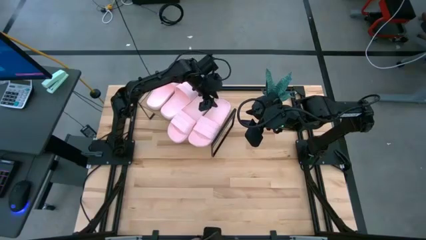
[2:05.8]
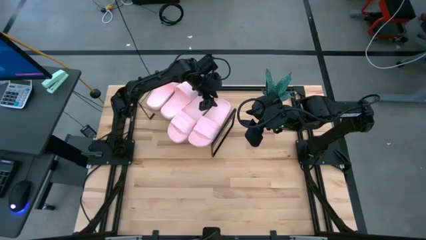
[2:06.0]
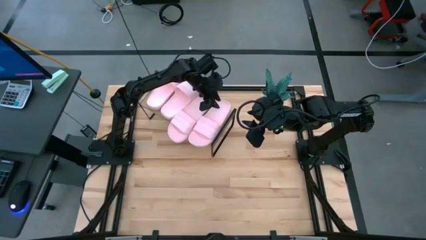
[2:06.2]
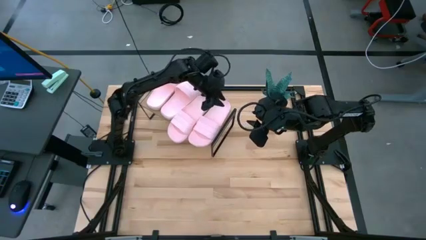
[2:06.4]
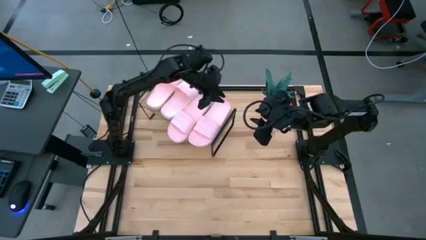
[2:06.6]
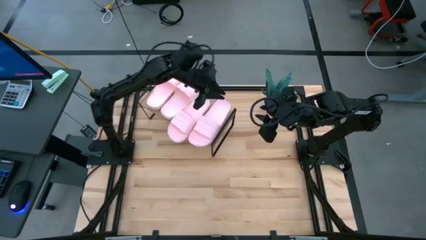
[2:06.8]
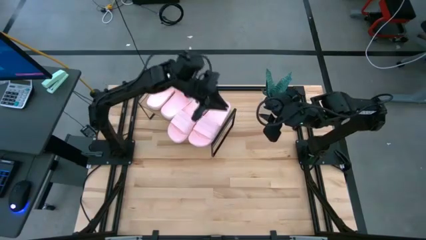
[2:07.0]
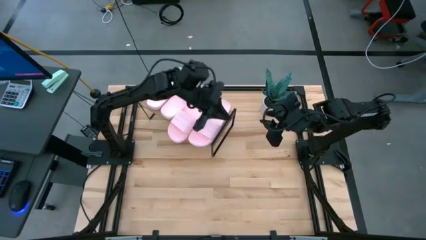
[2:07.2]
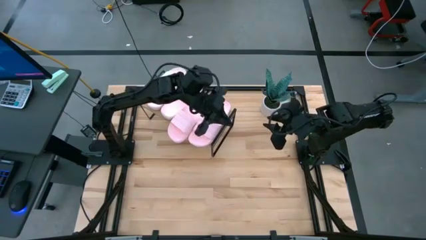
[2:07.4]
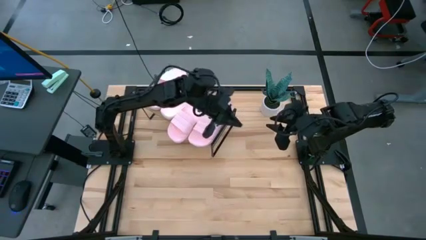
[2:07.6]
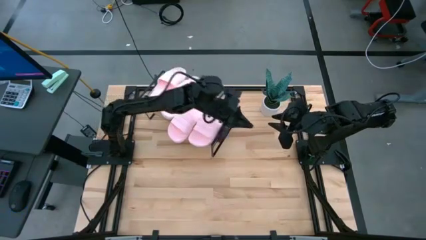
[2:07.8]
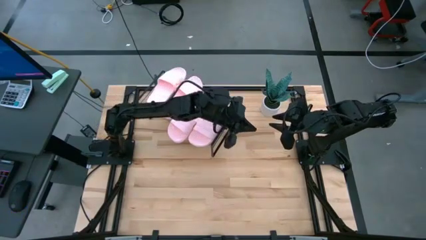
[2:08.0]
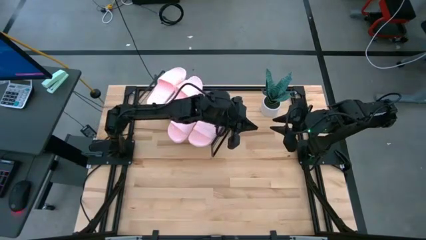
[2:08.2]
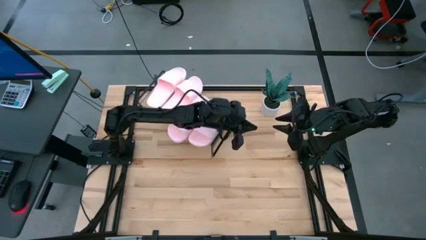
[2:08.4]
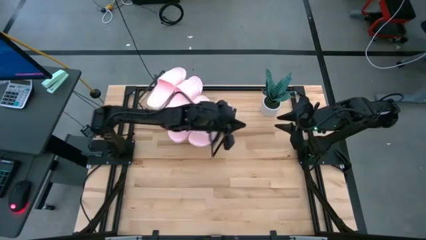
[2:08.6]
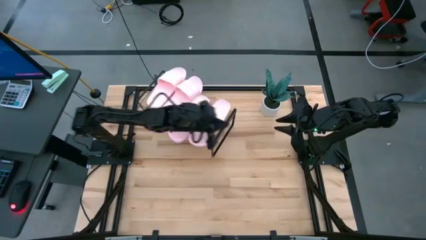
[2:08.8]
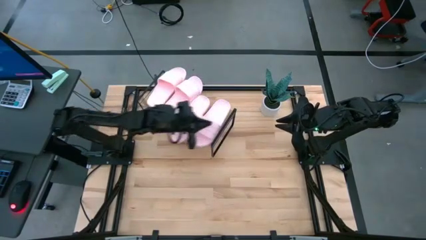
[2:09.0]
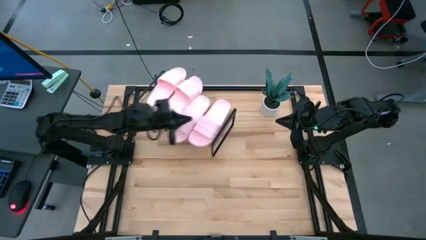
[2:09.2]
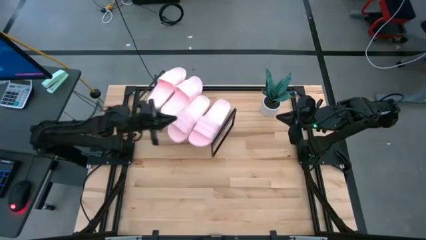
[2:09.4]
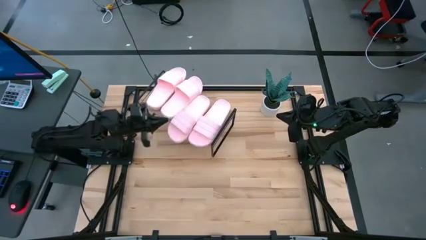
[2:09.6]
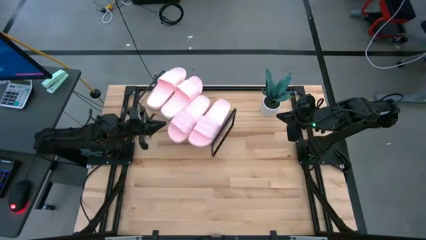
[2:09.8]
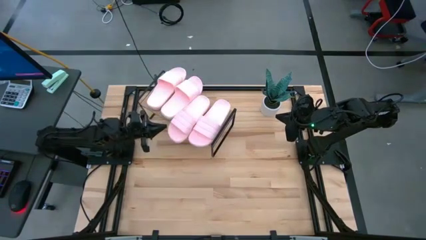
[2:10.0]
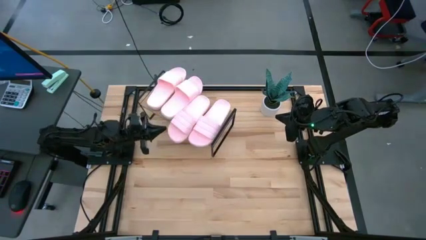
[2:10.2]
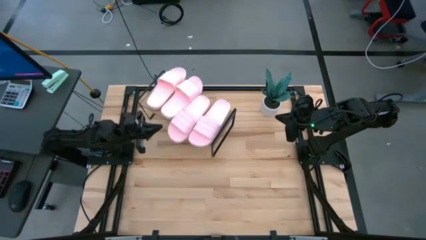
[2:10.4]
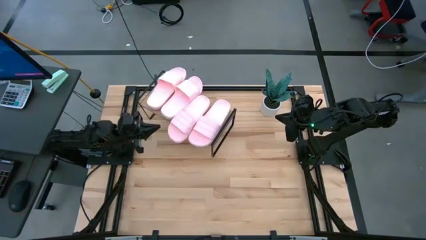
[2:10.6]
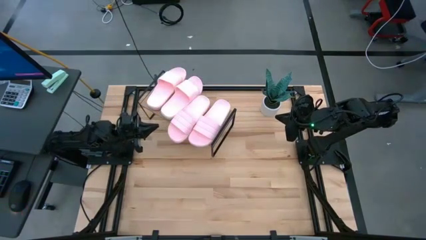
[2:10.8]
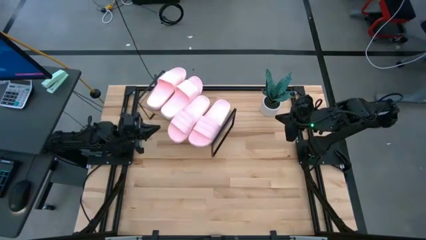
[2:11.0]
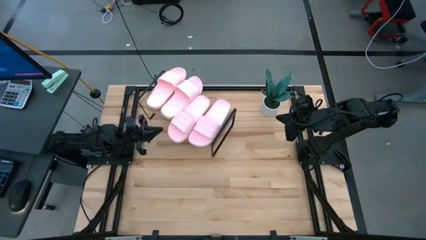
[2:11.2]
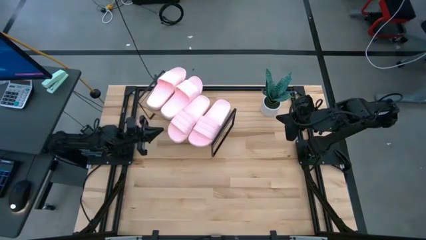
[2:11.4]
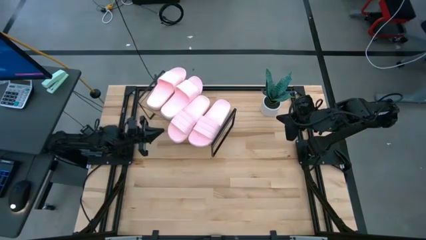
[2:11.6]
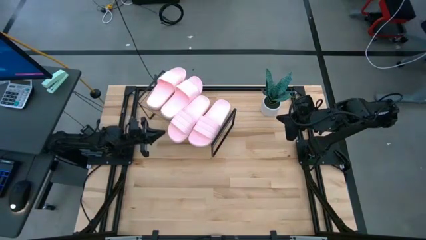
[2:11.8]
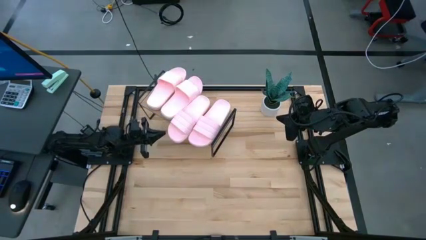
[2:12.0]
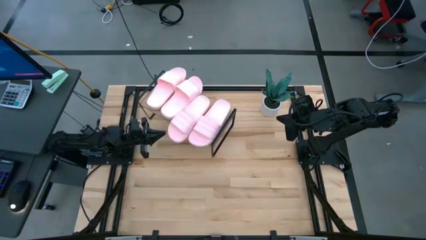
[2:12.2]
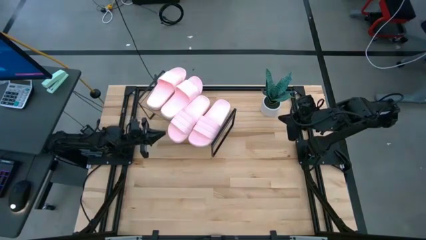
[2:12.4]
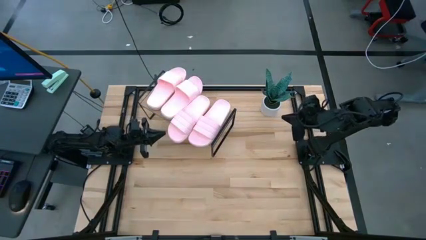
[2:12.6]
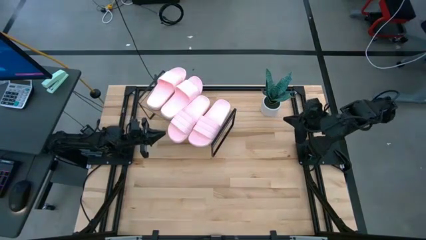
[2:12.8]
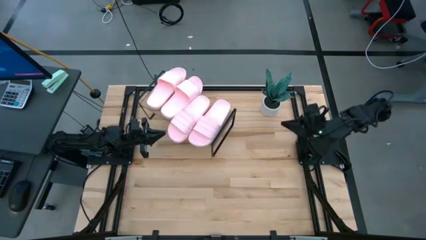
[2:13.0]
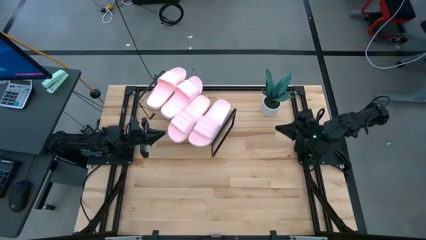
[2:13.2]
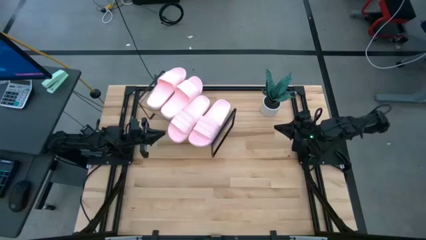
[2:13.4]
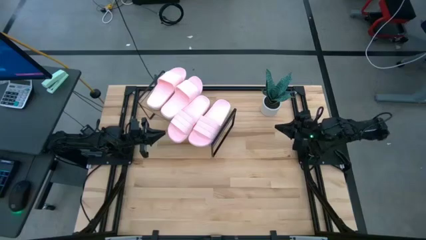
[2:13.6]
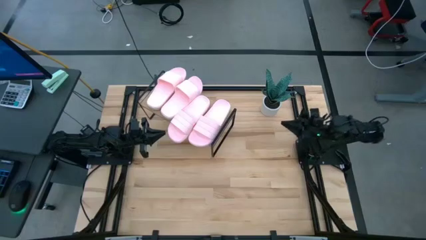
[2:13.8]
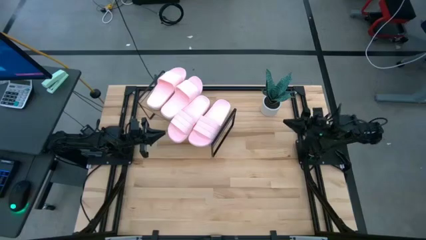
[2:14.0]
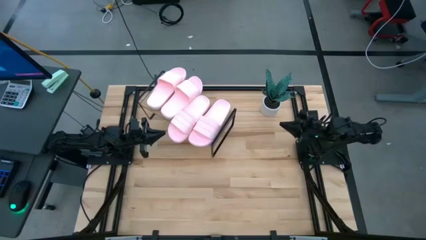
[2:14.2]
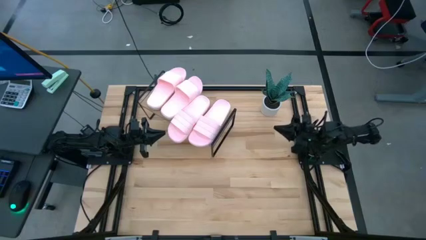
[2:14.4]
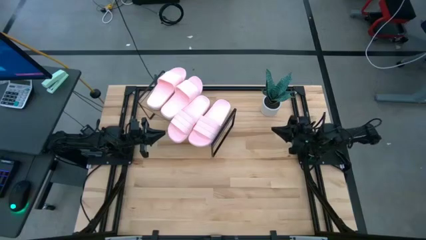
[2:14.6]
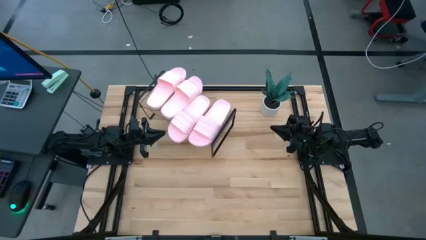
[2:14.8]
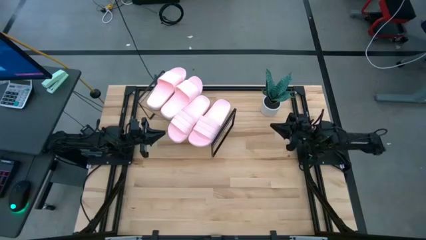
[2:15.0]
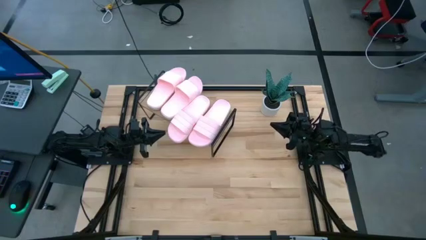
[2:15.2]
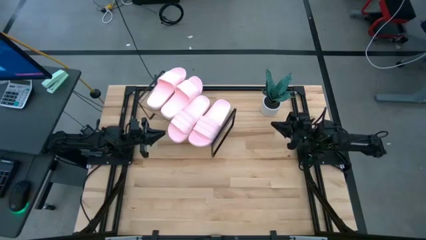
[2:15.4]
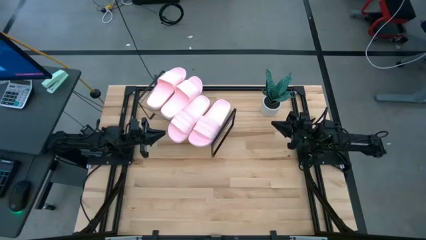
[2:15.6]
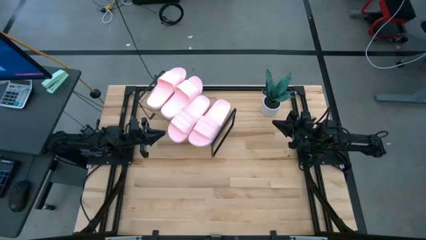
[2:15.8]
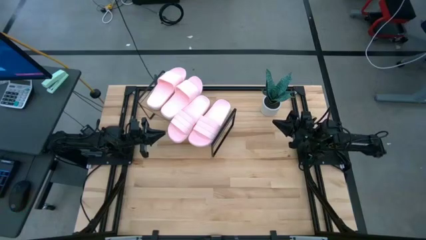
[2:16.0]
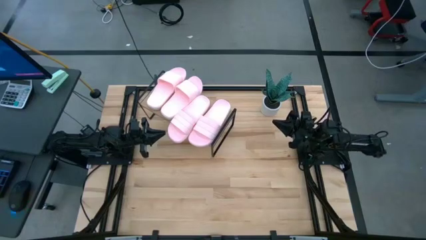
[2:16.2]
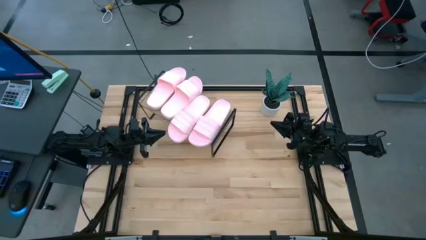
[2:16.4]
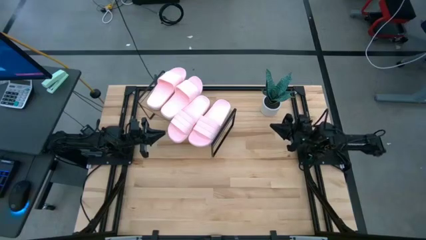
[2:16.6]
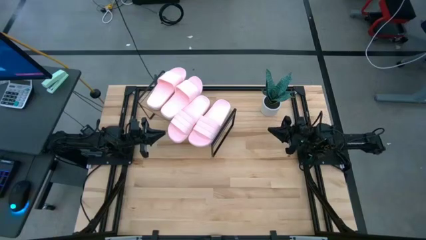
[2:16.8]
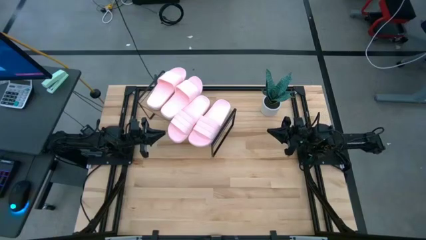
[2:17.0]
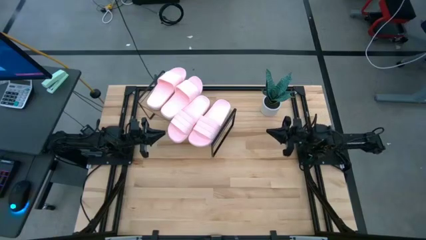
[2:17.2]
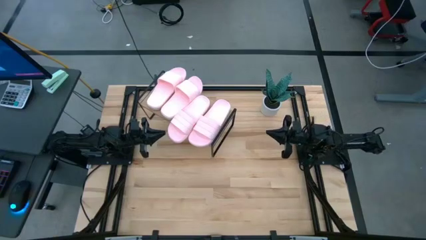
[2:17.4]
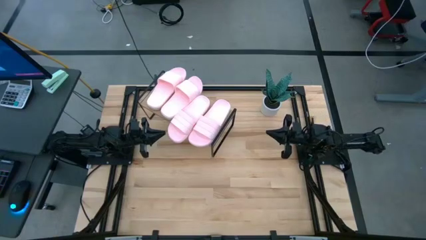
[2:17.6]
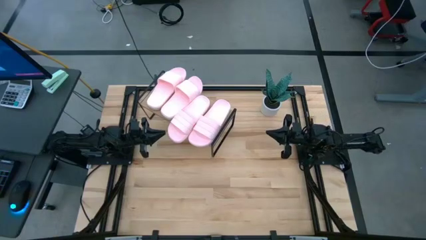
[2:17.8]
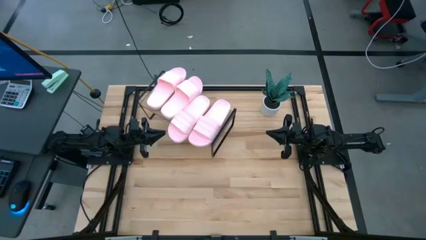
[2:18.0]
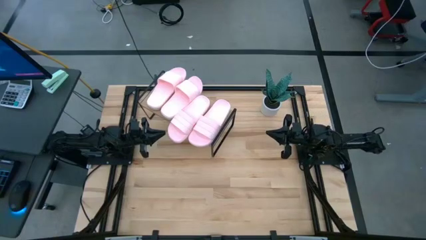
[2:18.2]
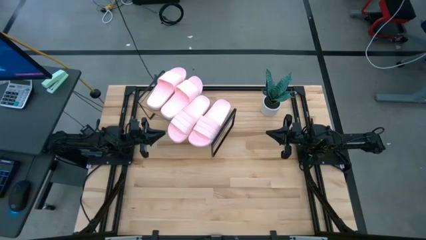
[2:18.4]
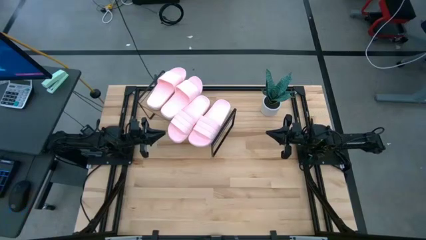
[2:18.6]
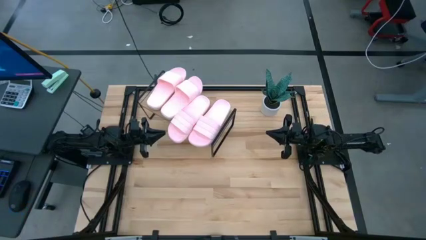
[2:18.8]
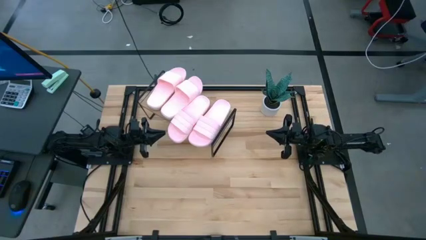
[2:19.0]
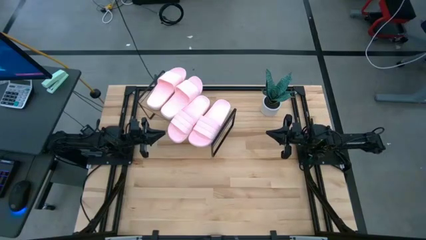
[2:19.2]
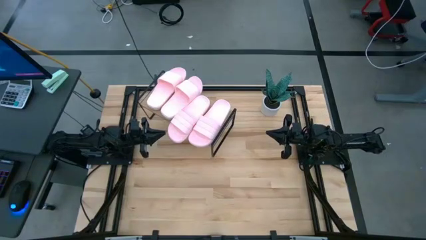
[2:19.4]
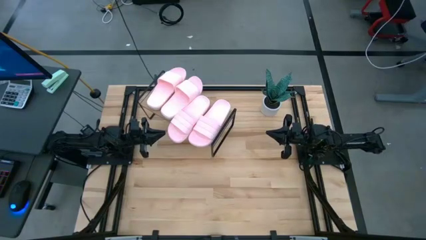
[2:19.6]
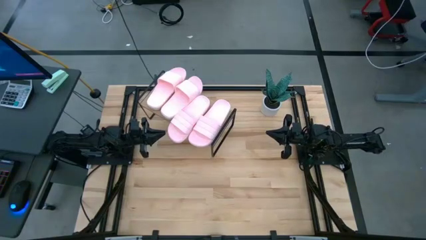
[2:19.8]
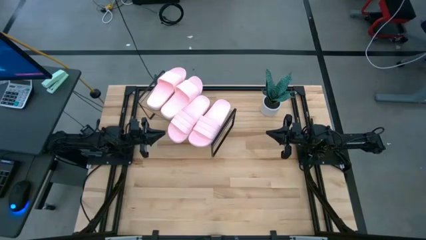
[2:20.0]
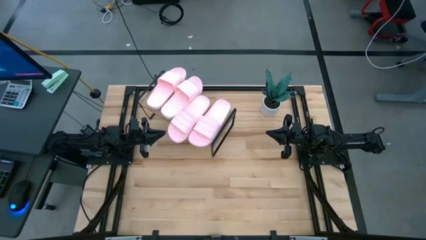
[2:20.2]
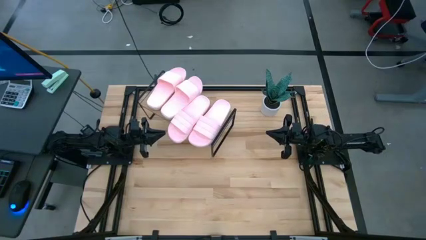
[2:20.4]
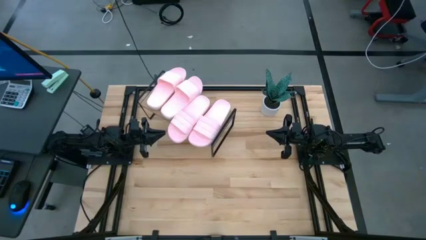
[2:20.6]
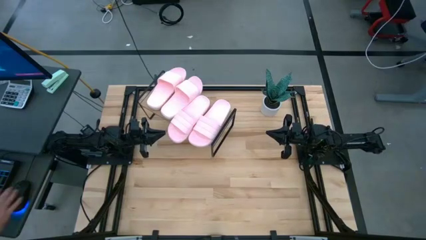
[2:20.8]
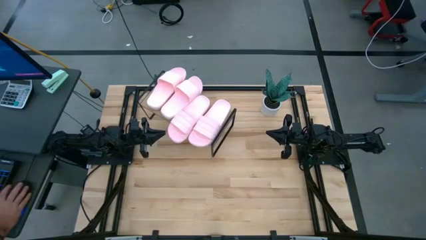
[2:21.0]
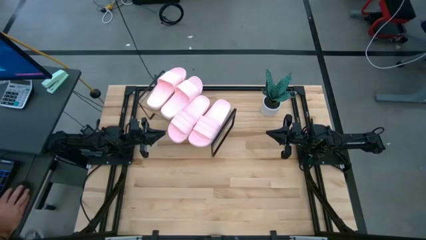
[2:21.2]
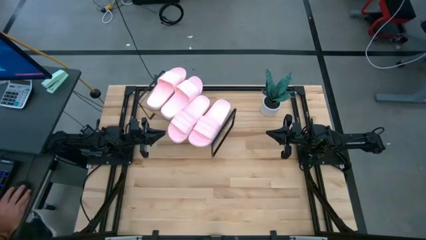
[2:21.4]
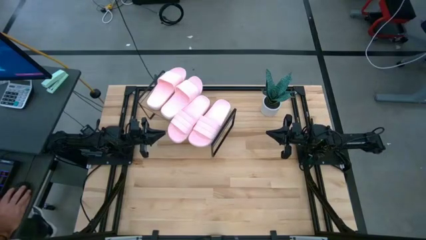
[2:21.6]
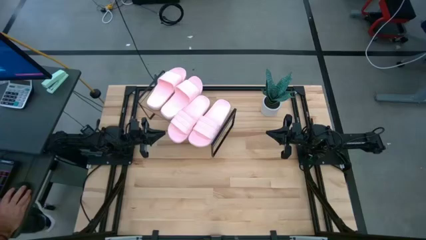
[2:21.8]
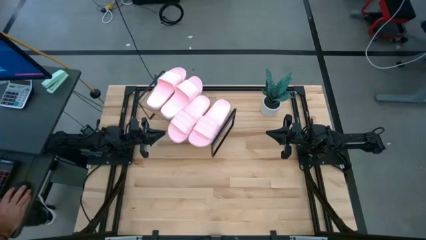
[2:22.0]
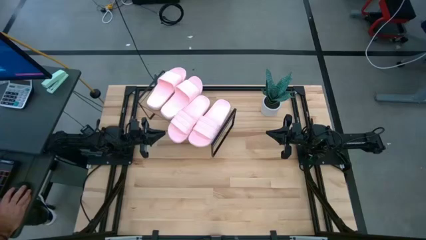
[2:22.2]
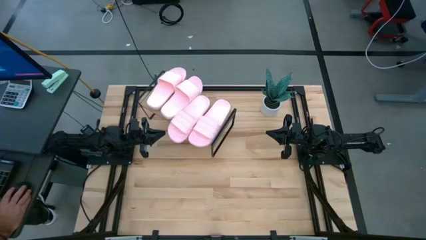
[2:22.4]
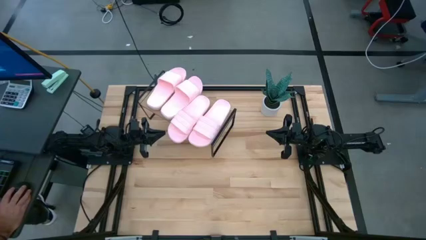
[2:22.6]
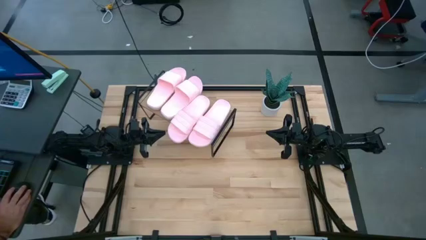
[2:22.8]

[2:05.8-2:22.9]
Task: Pick and place slides into the shelf
Return to Home Position
